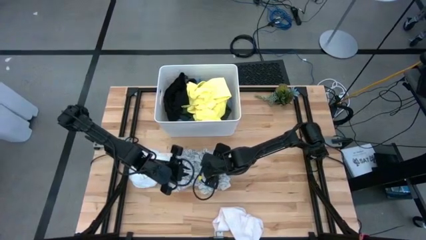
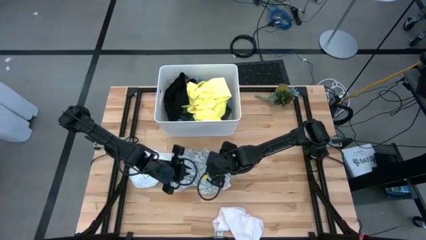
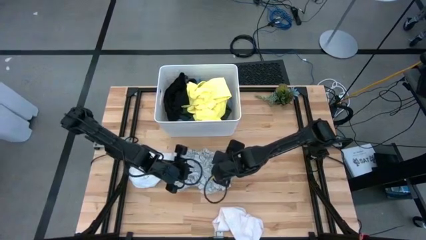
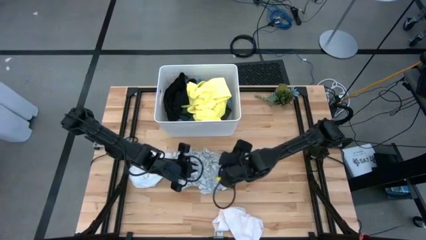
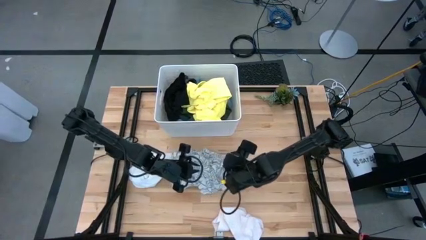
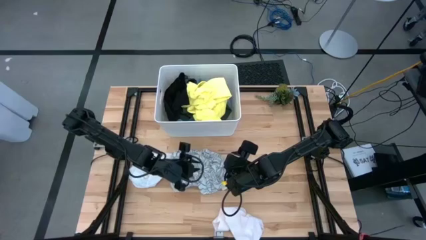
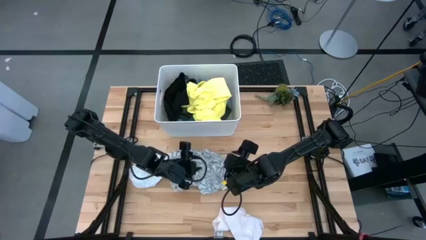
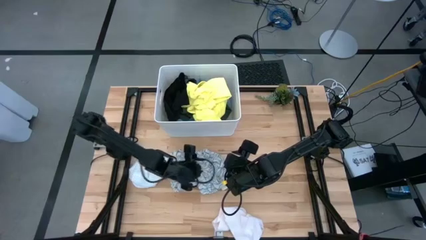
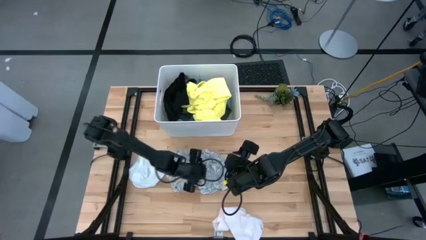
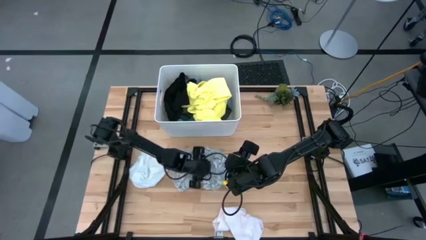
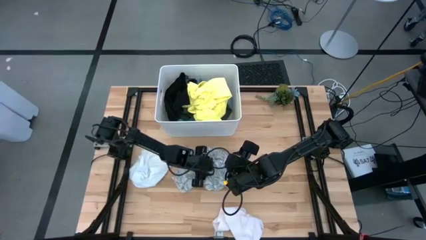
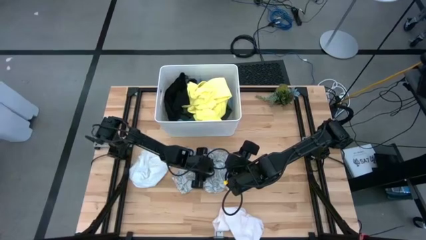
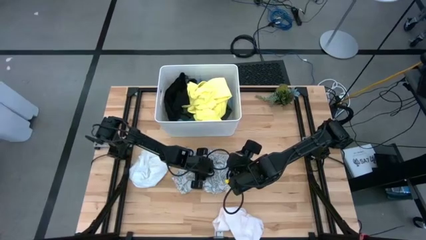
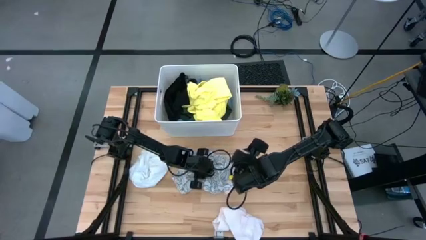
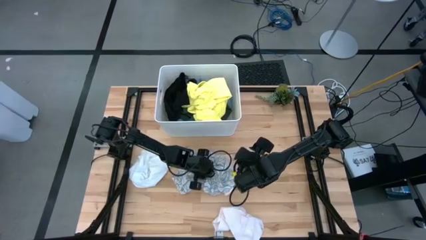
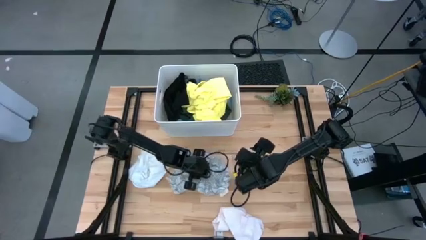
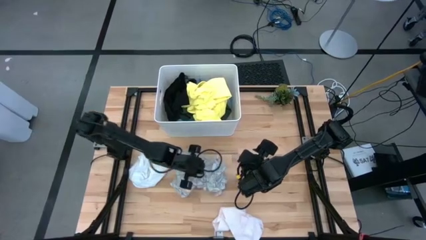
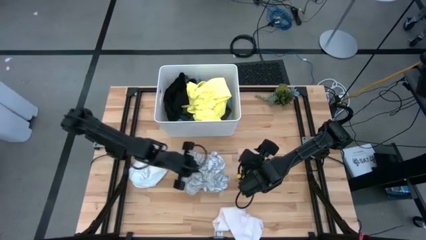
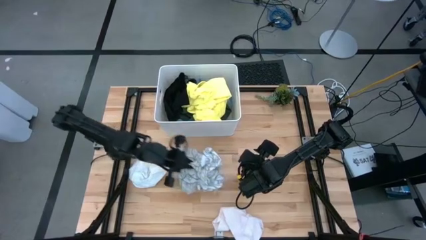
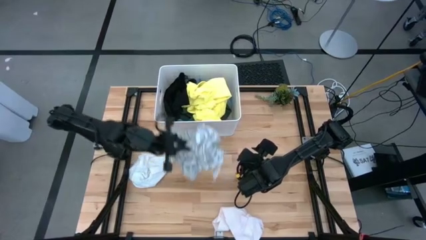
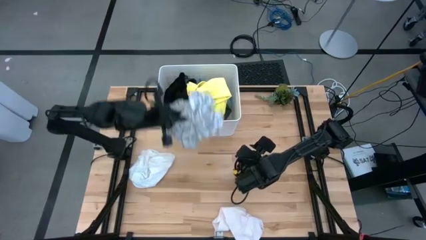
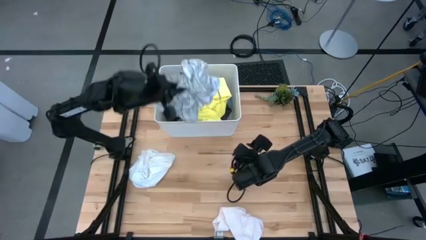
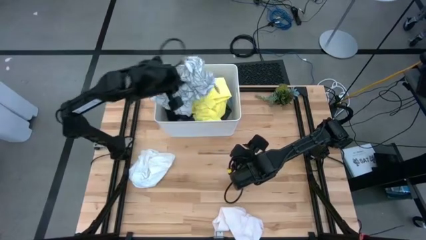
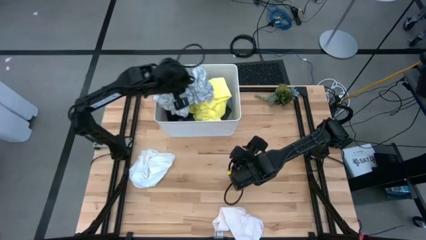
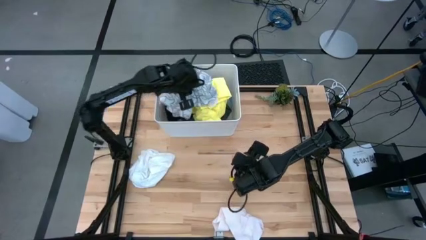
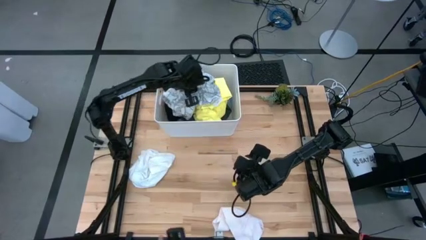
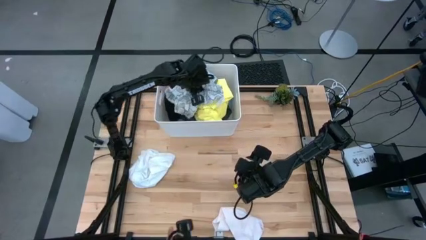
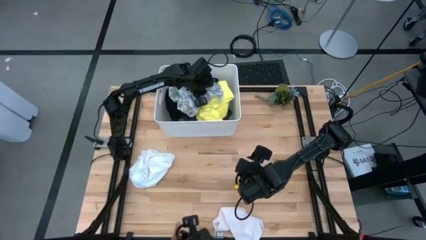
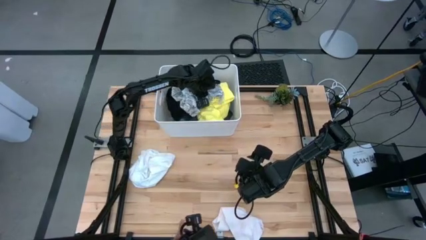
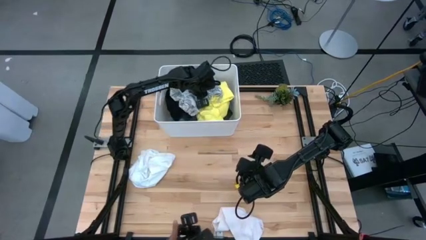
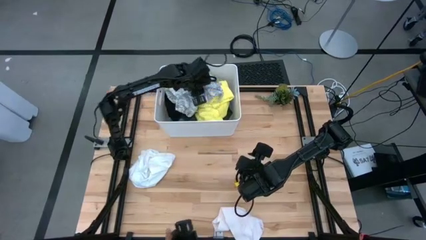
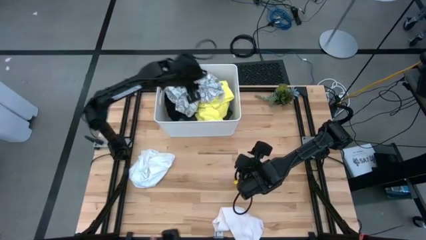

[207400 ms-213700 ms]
Task: Fold laundry
Put the folded white patterned blouse into the white laundry bin

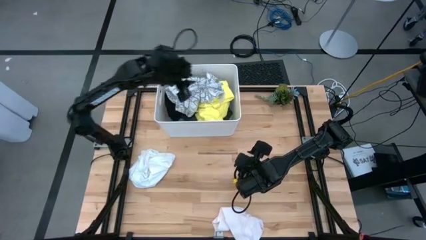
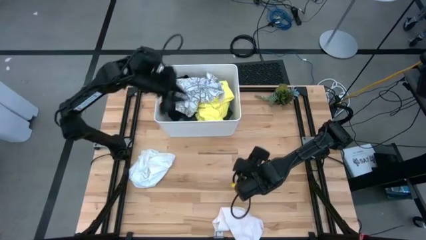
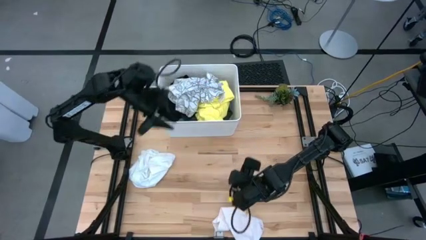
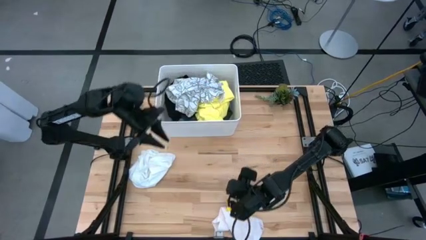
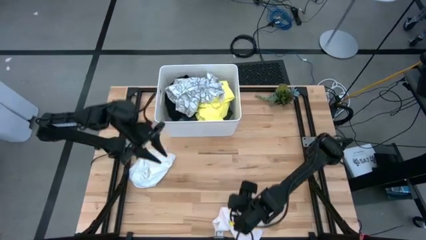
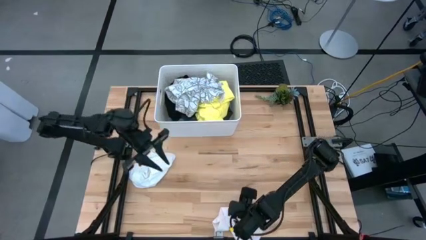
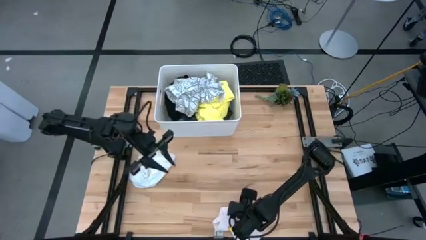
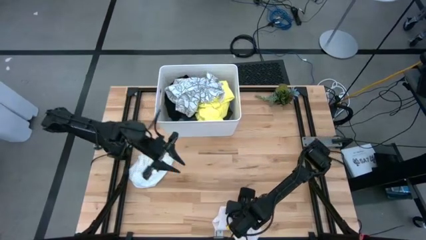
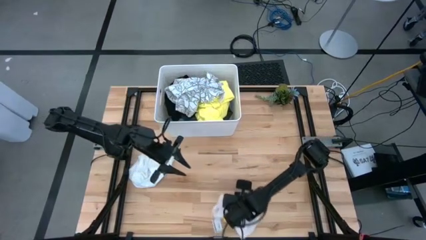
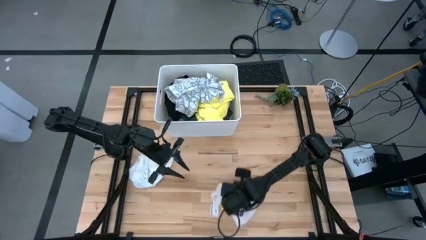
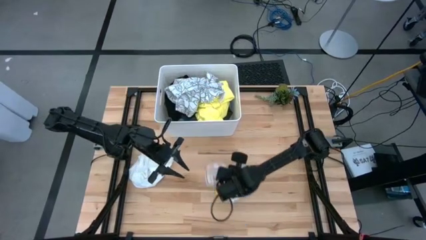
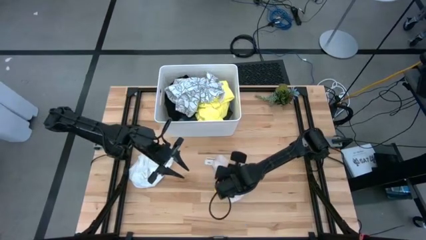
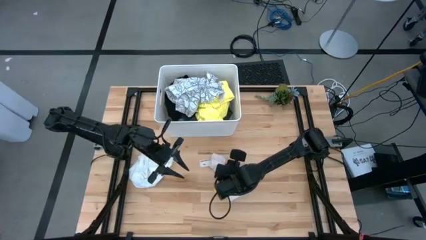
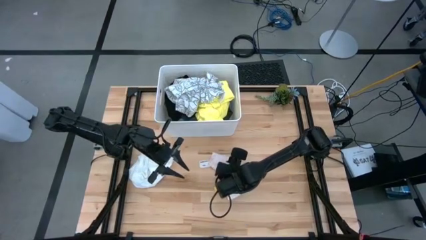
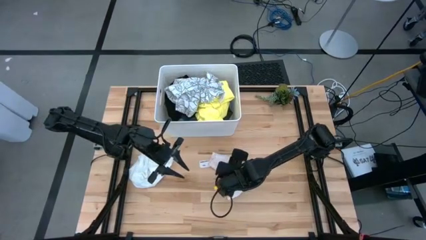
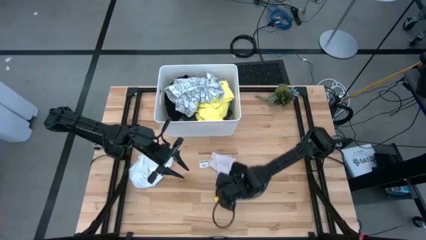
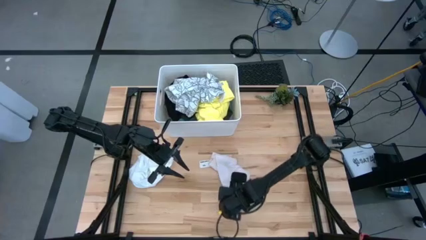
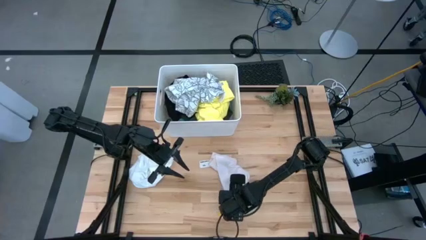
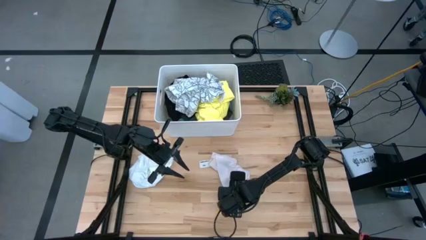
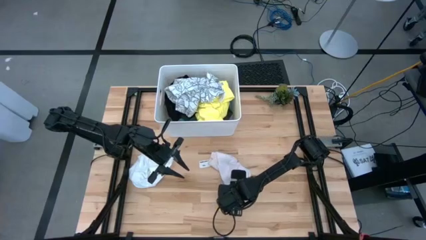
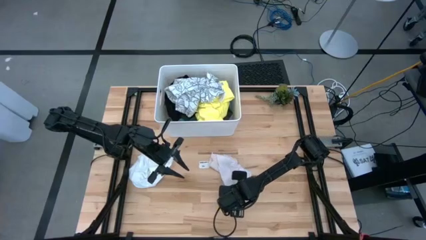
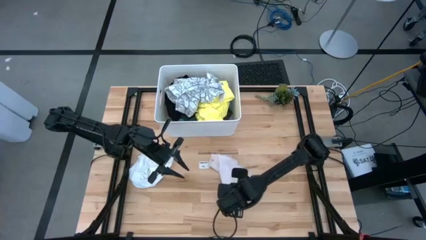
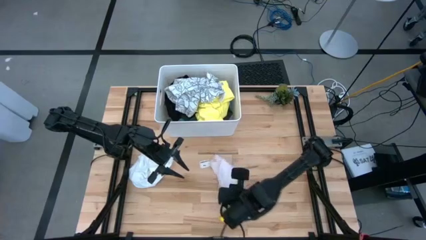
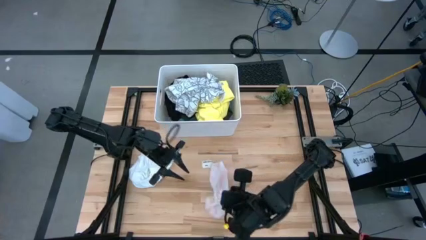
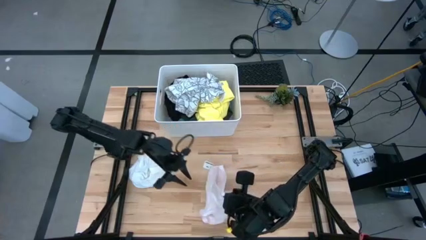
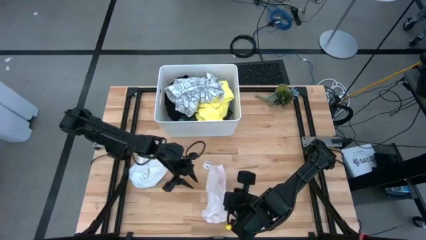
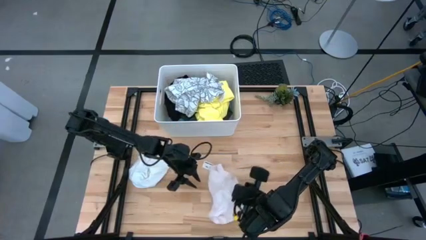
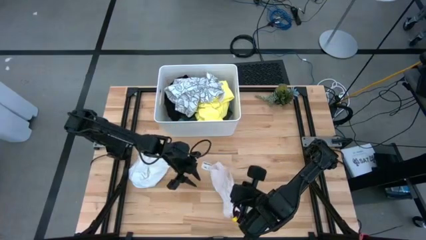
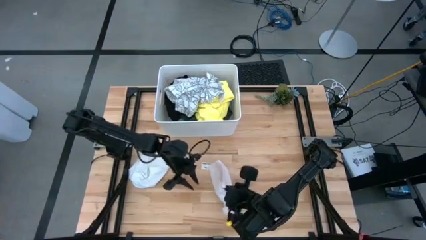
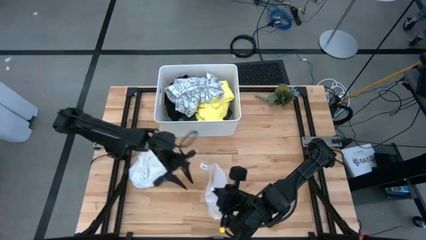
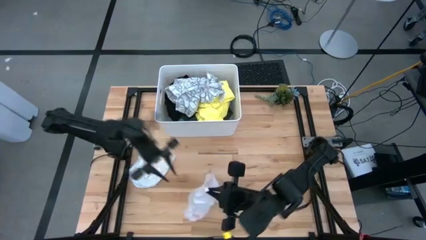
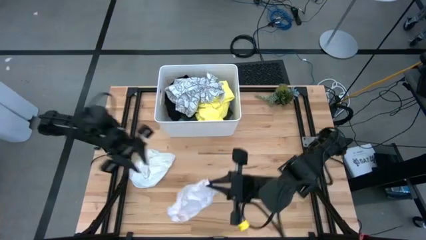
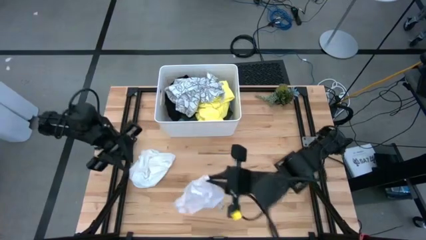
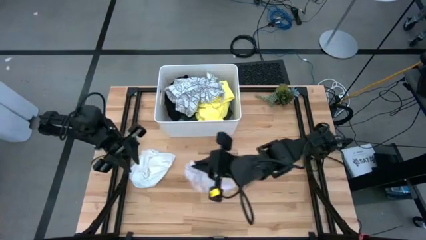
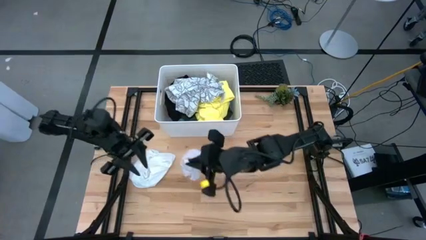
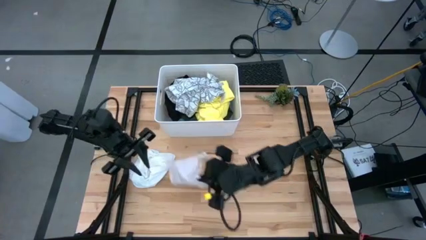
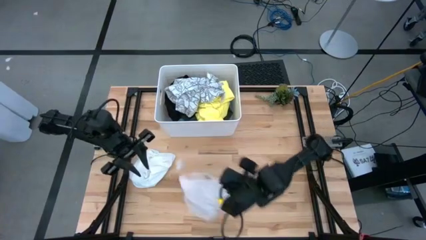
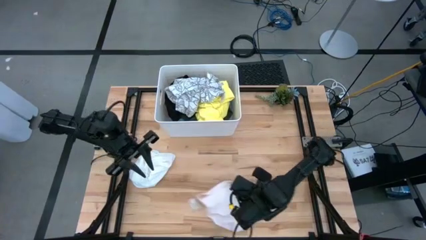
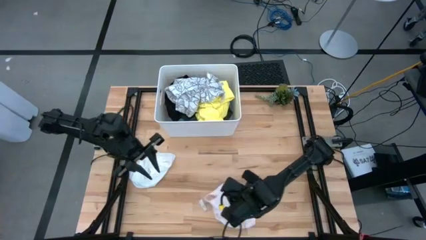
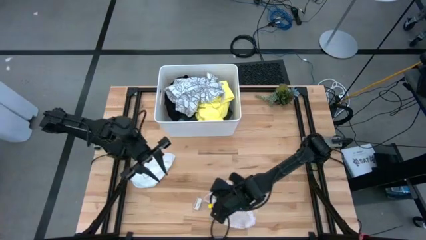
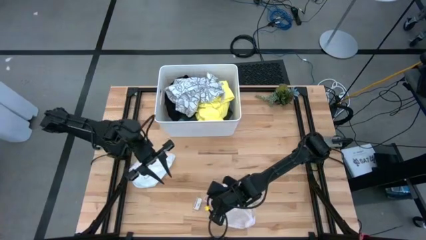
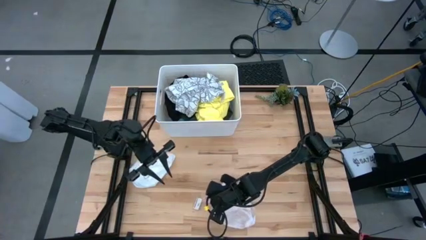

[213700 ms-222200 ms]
Fold the pink underwear

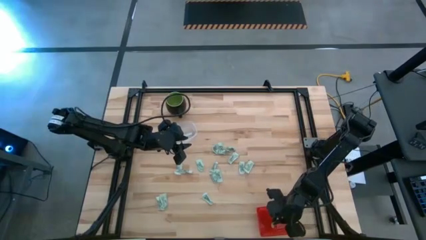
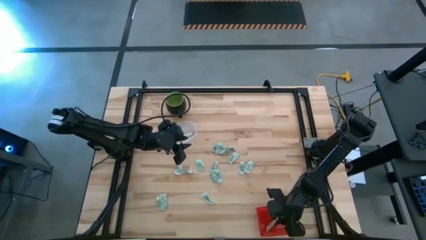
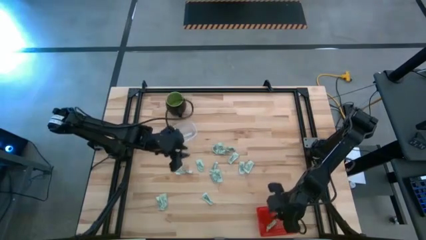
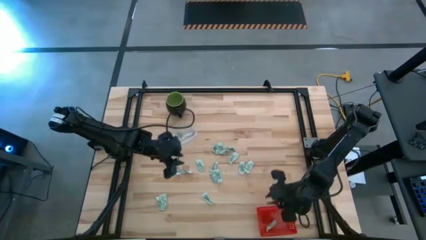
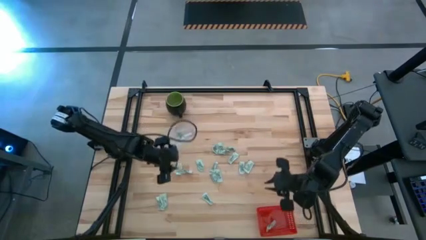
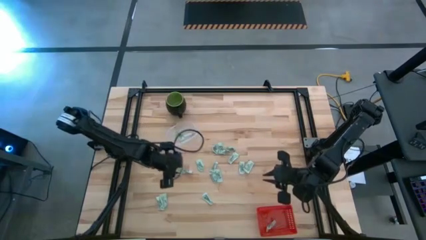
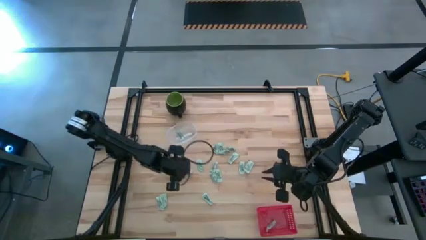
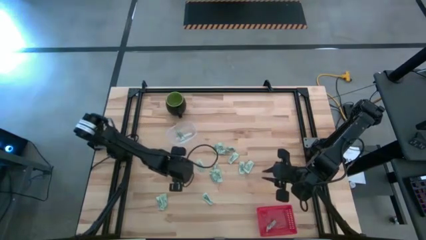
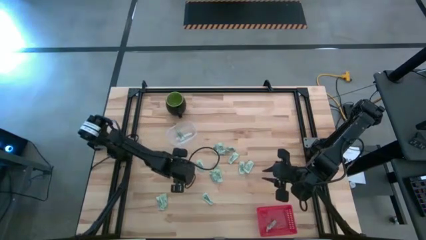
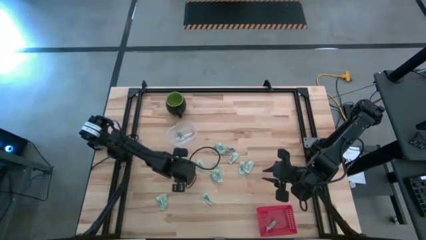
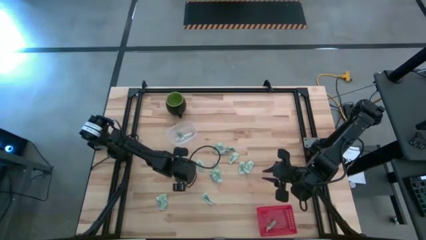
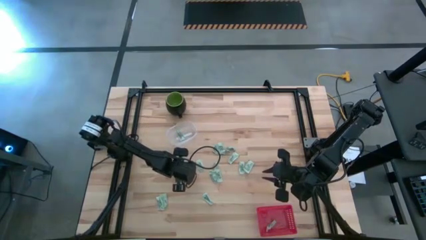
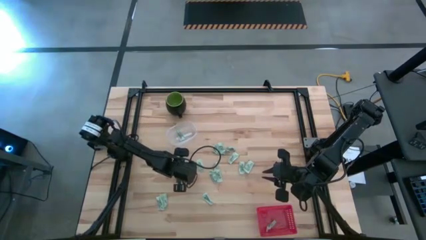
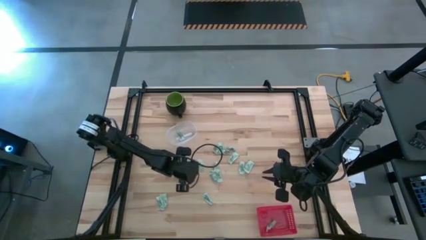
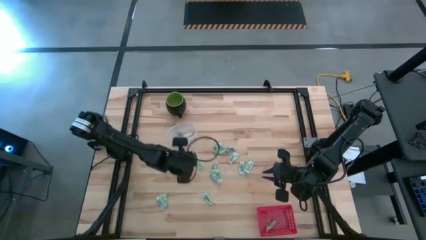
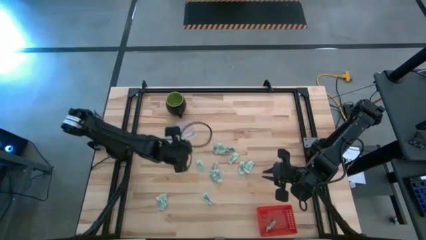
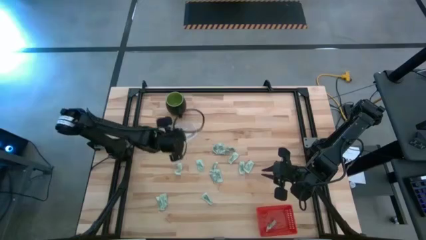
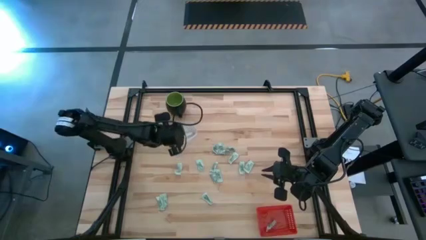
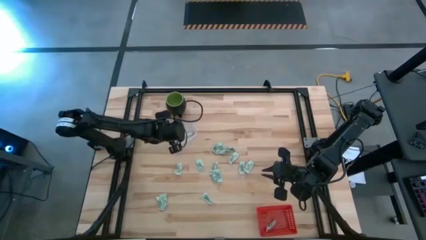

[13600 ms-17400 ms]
Task: Pick and place items into bin
Put the green stevia packet into the transparent bin
